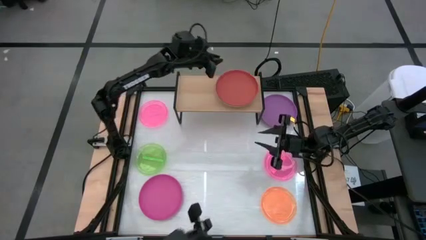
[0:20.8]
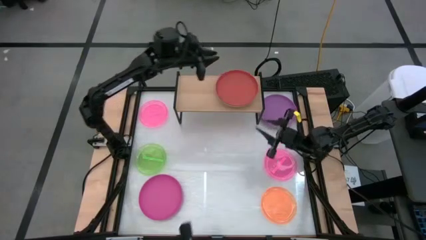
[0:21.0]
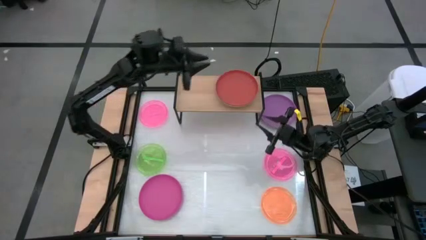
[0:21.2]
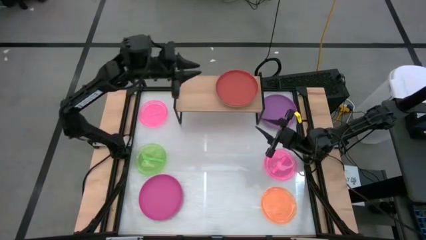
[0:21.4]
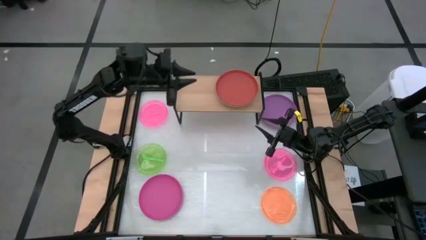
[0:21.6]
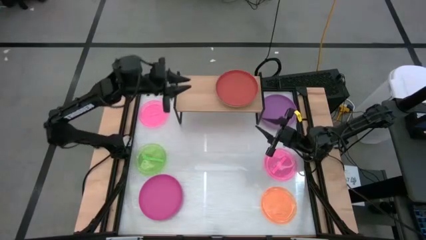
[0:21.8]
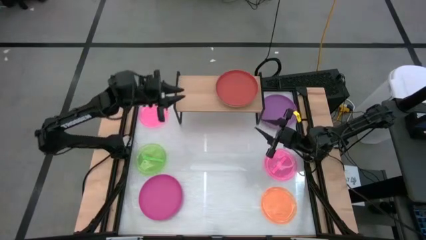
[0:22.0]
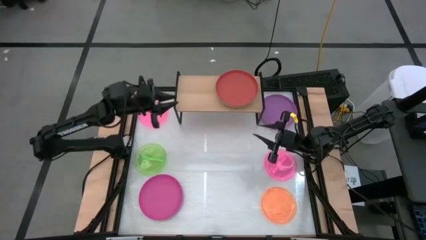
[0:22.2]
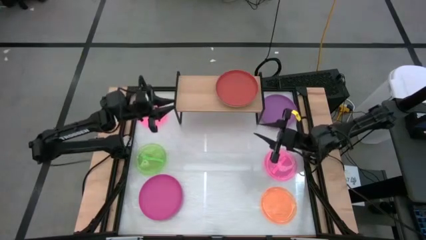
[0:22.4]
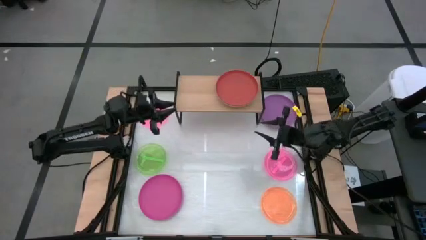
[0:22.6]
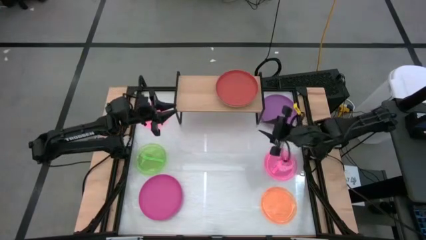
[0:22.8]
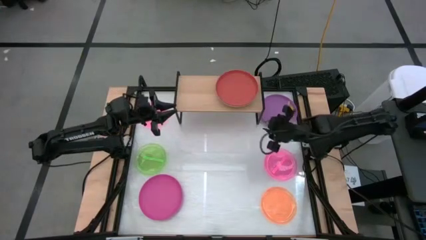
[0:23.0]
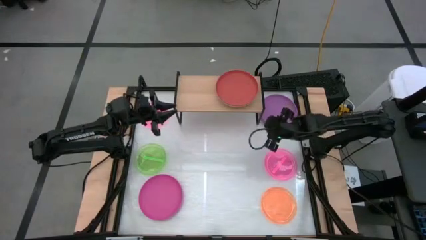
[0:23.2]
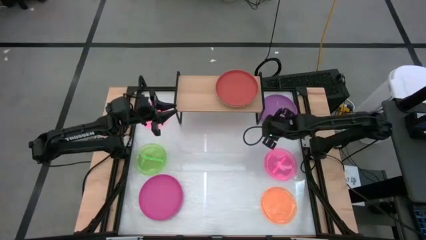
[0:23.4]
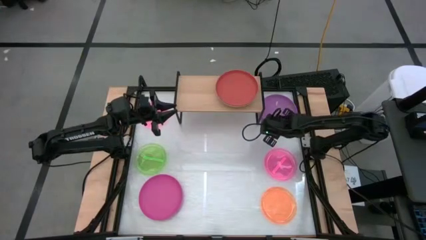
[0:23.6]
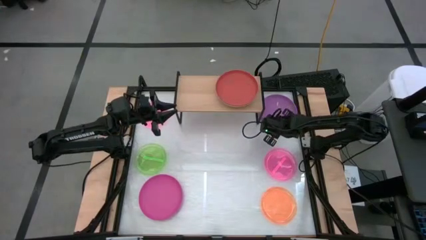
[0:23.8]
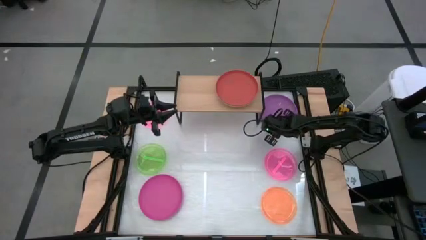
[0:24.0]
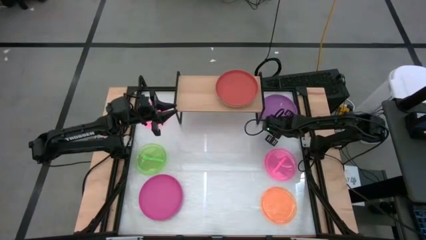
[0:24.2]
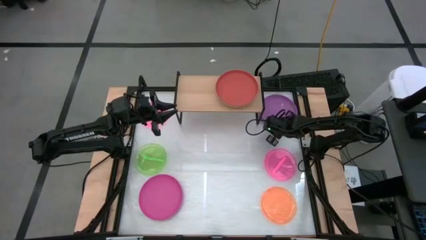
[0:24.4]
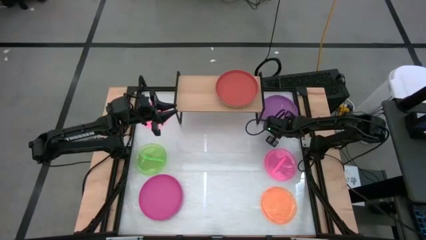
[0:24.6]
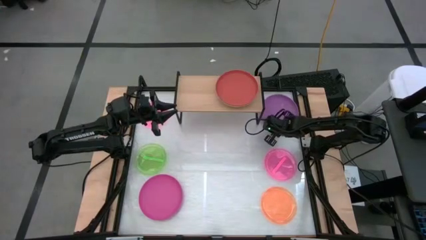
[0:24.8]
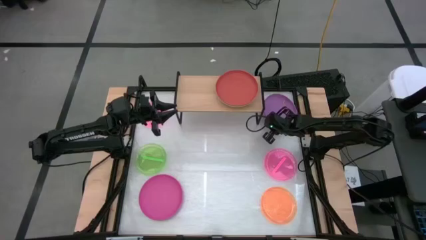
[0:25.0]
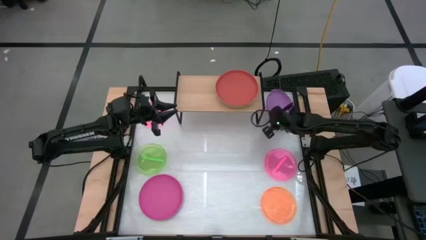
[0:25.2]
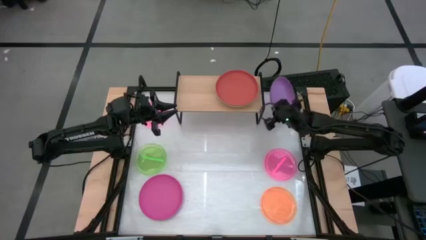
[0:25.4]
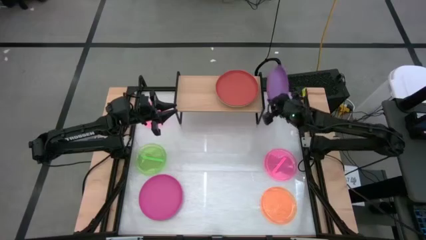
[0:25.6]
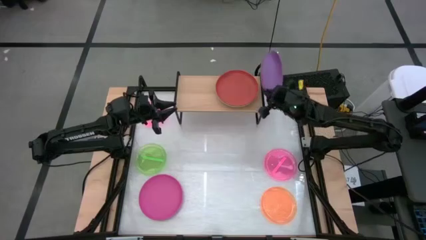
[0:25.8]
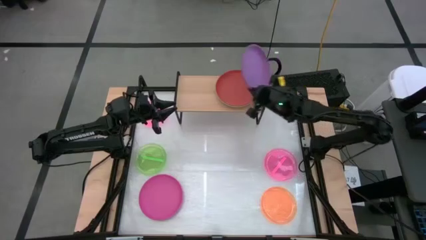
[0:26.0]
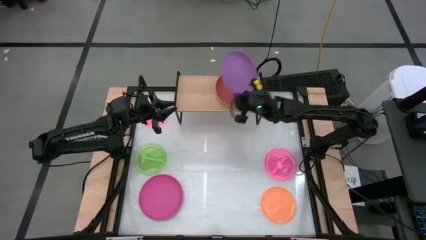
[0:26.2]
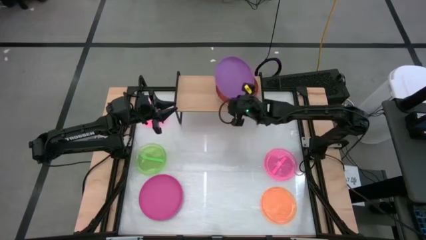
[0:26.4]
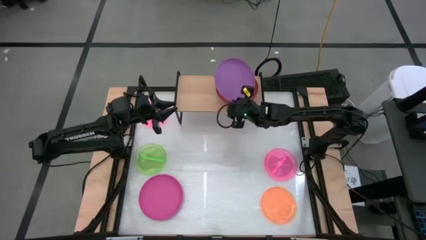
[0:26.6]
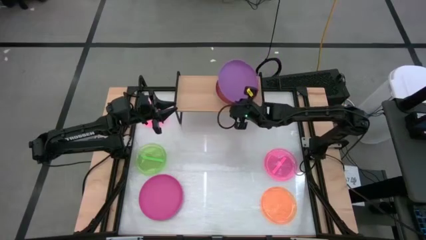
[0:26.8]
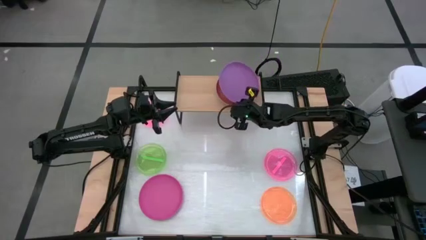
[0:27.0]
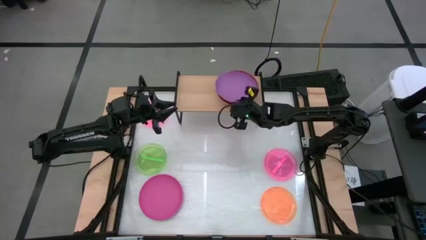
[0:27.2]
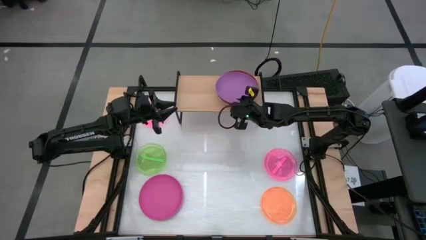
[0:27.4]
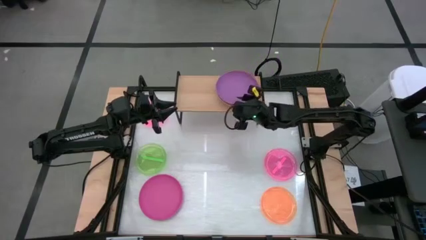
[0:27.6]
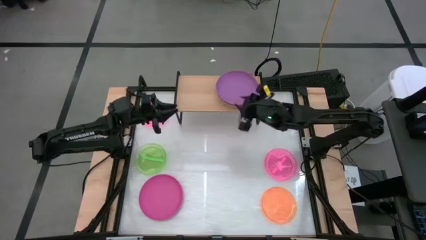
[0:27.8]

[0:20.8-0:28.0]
Task: Place and stack plates onto a shelf
Stack the purple plate on top of the brown plate on the shelf

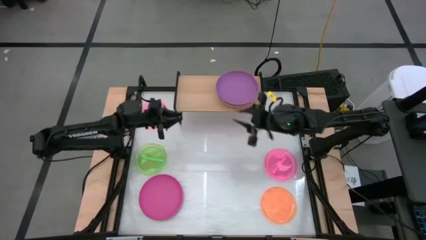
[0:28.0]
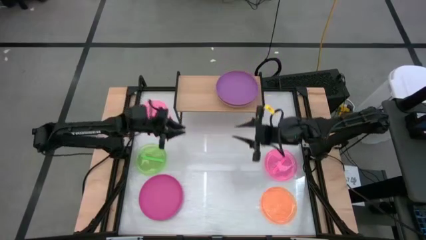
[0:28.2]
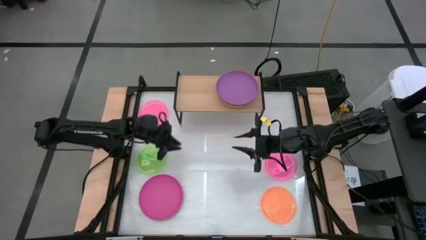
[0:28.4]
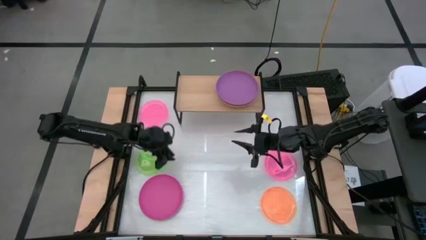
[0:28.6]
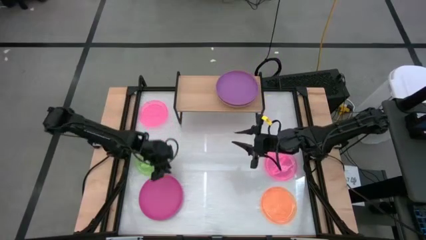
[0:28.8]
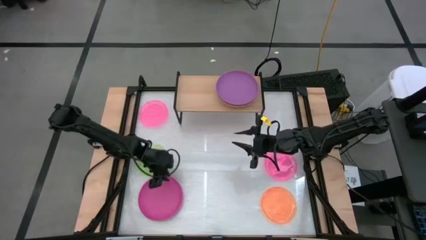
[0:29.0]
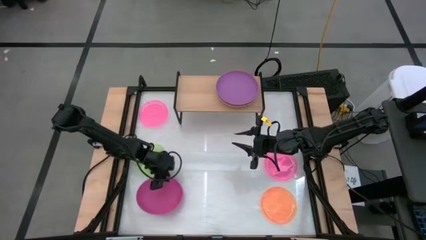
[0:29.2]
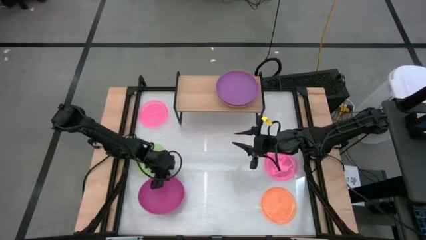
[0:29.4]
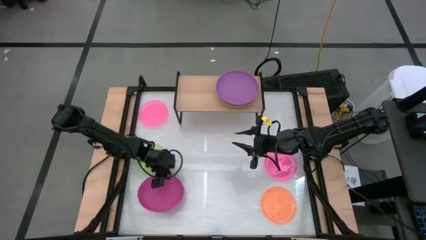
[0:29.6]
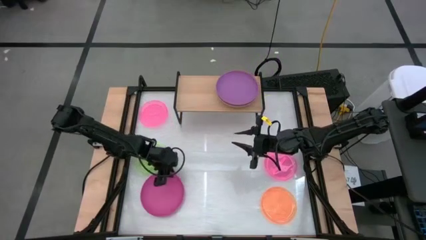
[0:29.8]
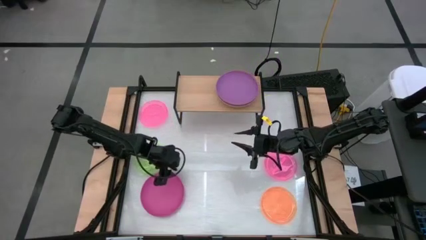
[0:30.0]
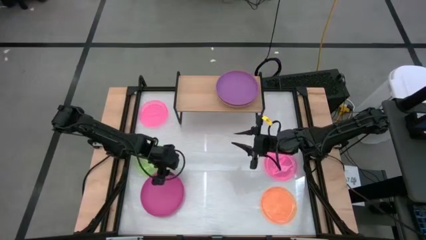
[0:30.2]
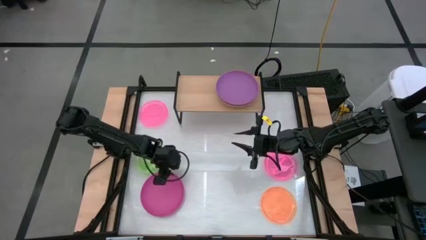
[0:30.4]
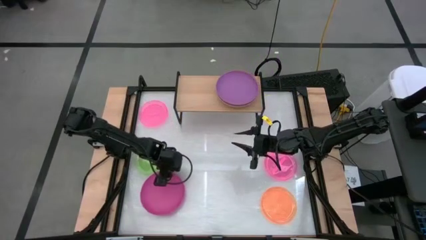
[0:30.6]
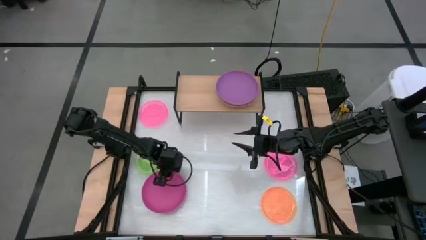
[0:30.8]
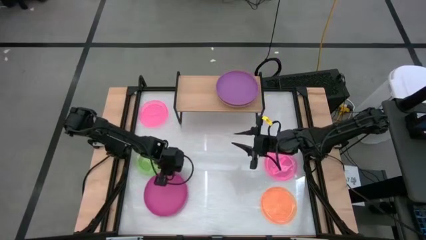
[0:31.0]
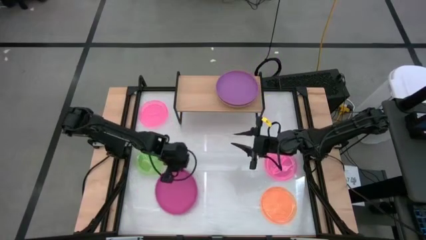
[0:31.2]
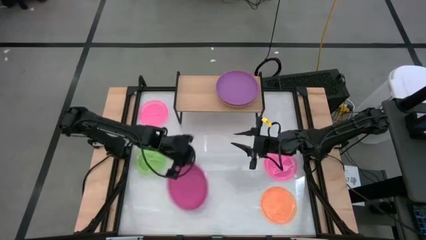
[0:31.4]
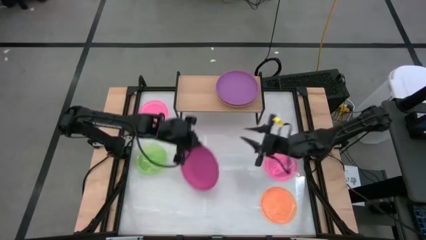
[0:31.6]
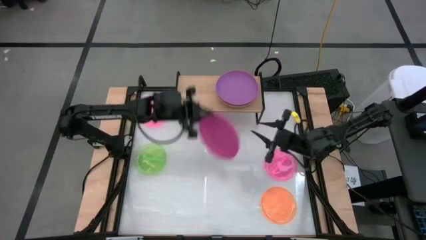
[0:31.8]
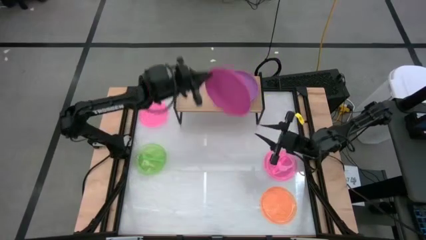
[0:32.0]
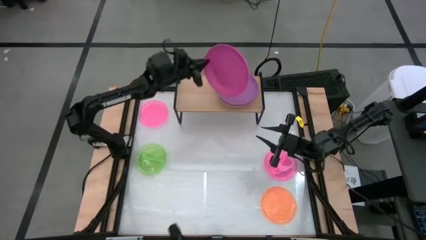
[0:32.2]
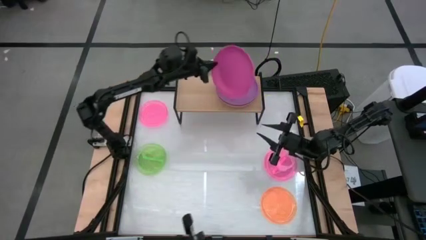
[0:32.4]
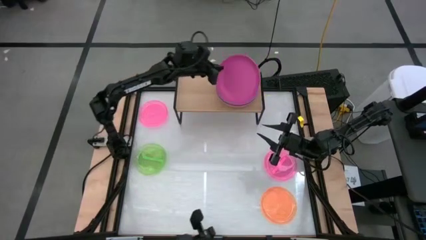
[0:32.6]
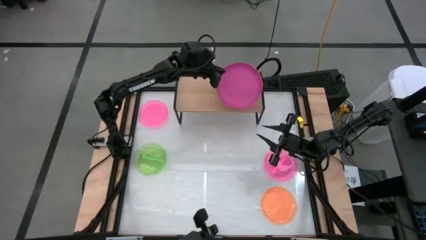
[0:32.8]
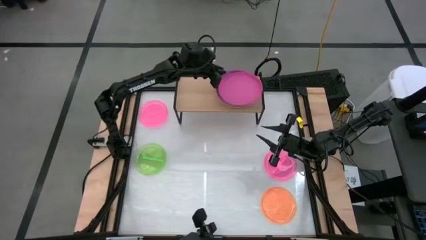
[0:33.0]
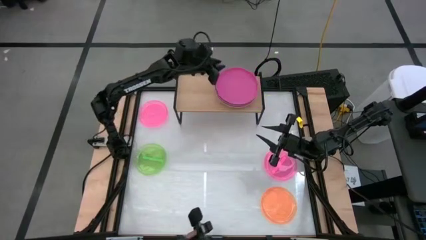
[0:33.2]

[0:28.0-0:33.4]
Stack the pink plate on top of the purple plate on the shelf

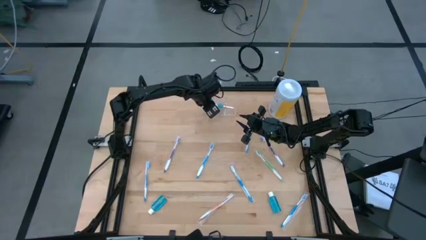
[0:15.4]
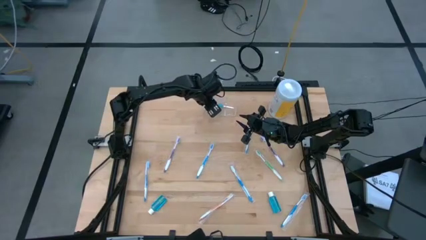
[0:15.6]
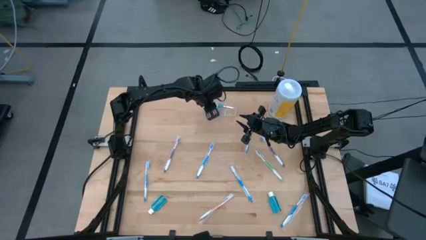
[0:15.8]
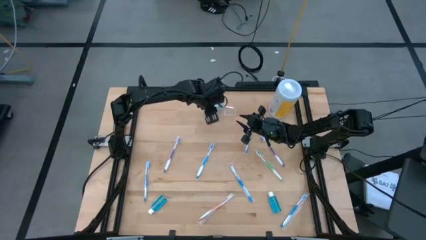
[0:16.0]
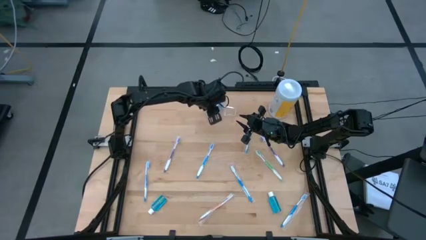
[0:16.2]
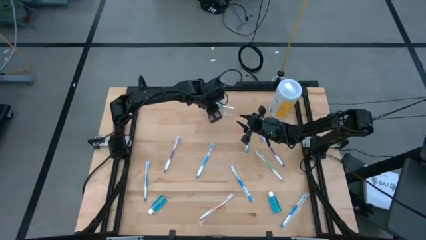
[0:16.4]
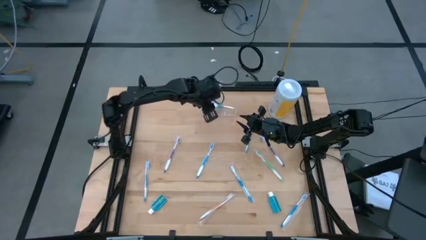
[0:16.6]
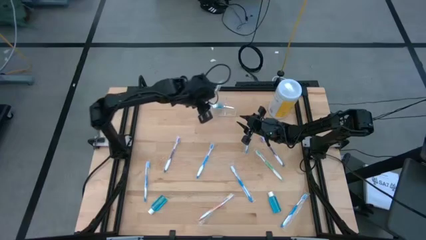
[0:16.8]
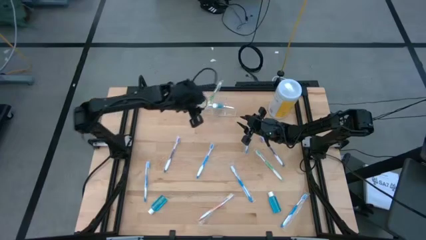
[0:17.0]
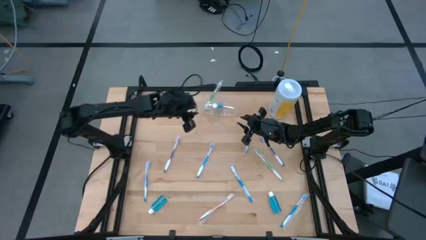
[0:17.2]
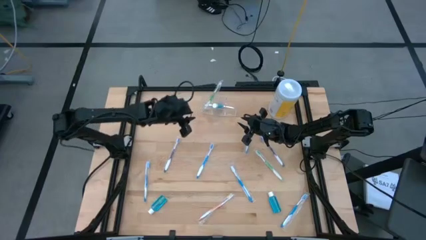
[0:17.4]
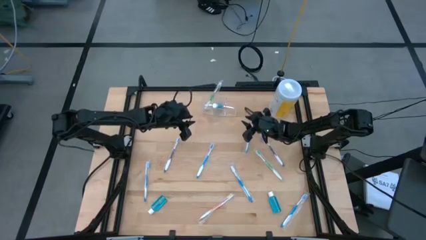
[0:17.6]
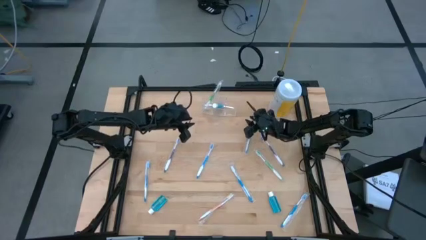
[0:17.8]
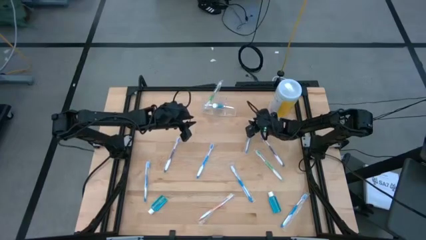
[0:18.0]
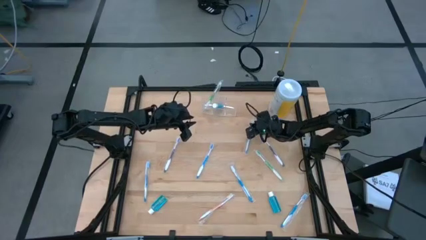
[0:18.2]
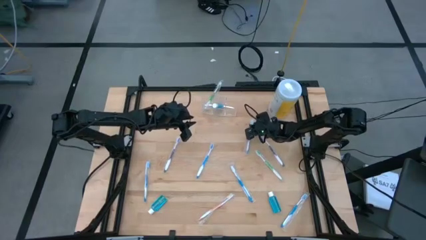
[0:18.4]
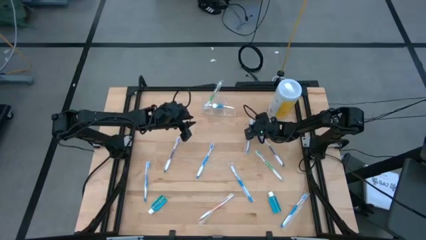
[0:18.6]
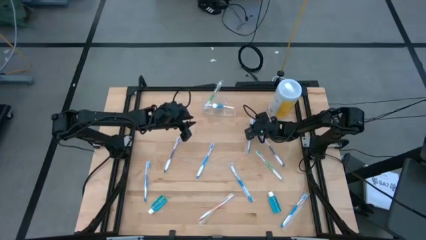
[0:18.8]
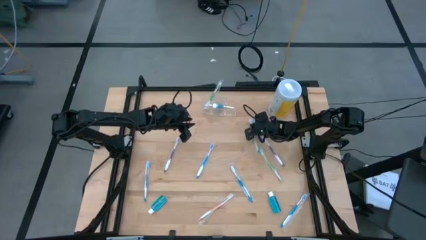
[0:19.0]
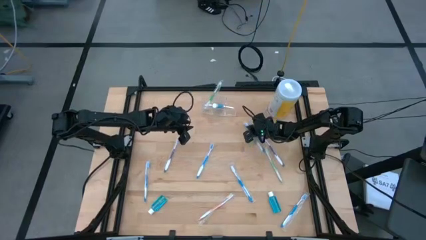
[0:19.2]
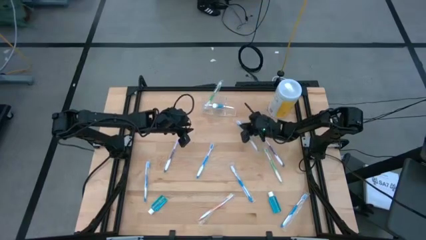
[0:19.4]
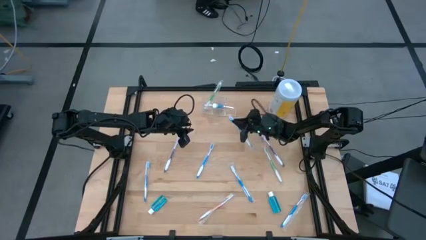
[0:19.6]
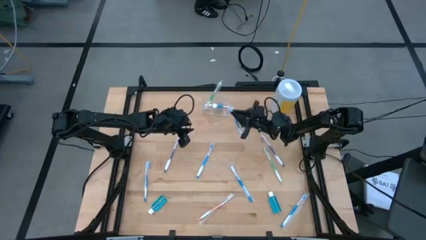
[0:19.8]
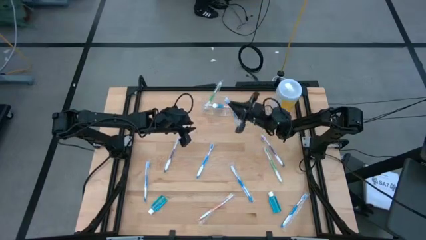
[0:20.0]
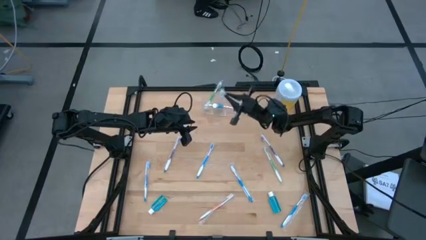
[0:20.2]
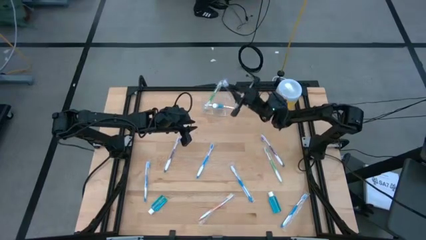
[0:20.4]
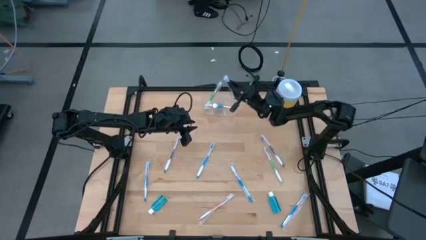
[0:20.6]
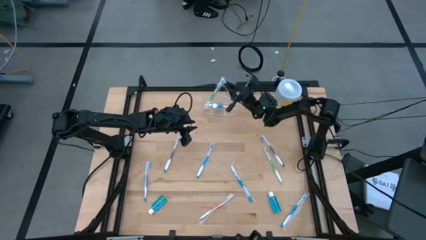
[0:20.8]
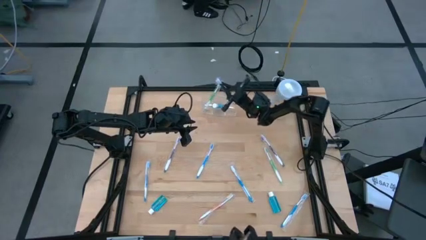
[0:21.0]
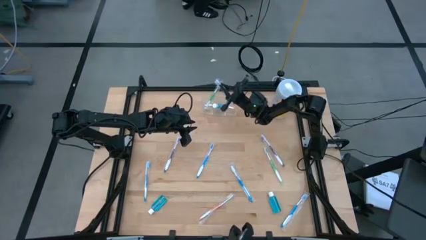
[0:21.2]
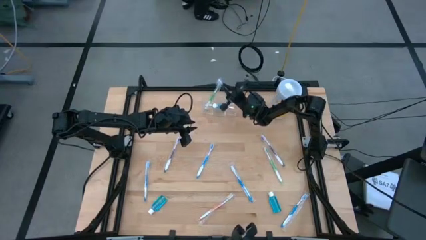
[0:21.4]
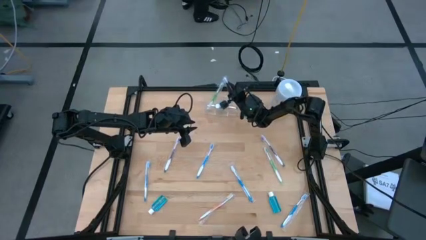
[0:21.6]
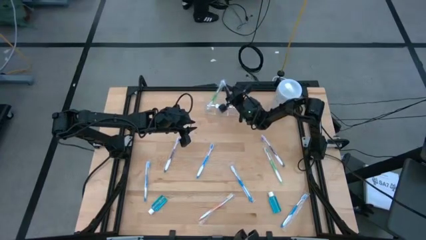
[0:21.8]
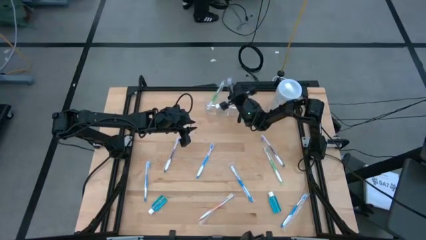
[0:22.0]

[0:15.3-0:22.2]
Task: Pick & Place toothbrushing station
Put the blue toothbrush into the transparent organizer
